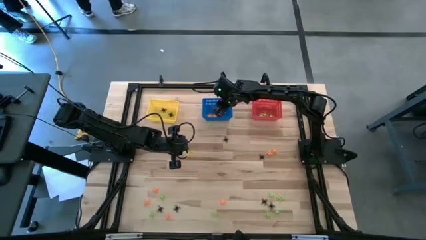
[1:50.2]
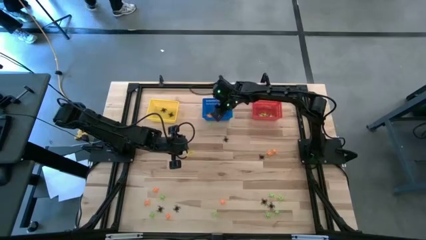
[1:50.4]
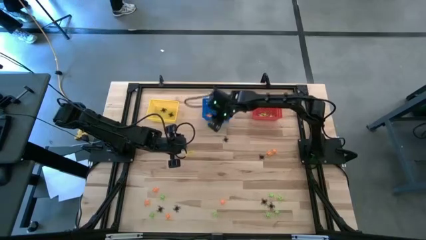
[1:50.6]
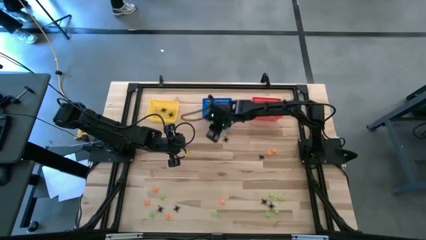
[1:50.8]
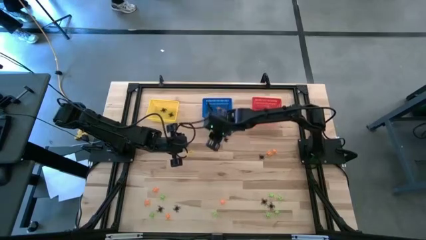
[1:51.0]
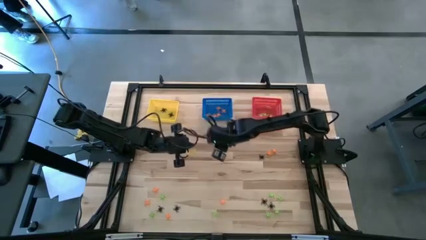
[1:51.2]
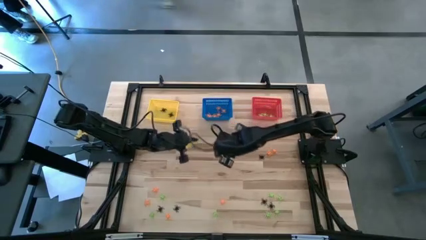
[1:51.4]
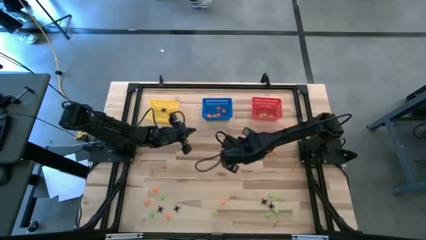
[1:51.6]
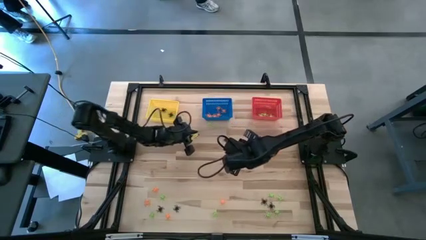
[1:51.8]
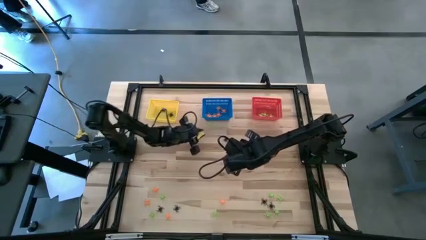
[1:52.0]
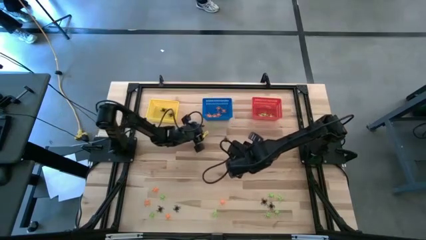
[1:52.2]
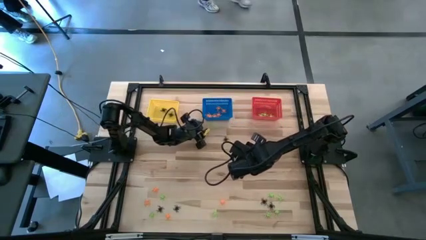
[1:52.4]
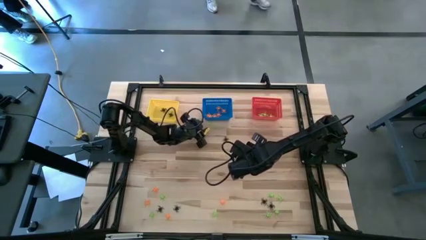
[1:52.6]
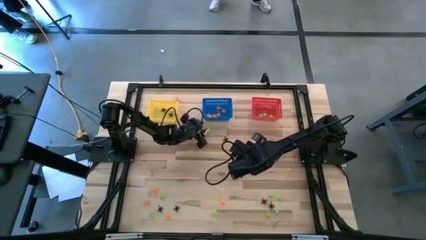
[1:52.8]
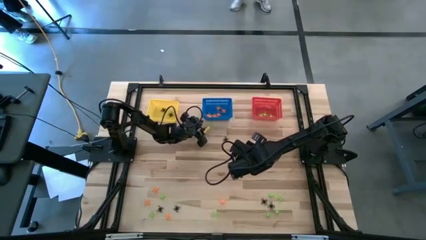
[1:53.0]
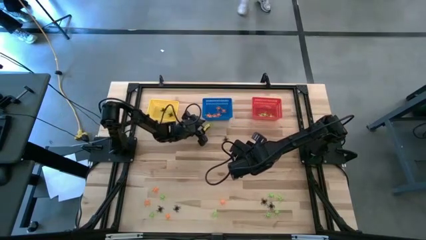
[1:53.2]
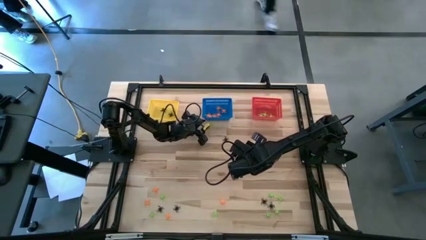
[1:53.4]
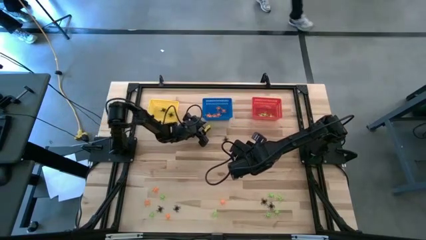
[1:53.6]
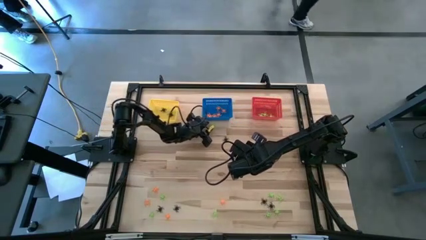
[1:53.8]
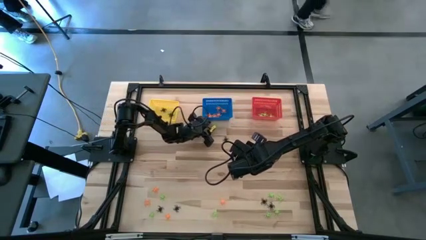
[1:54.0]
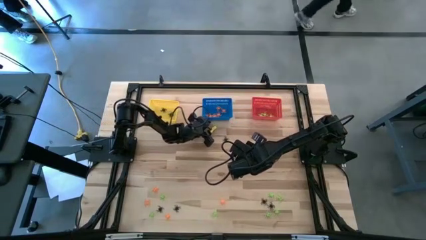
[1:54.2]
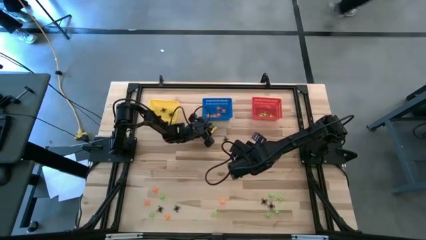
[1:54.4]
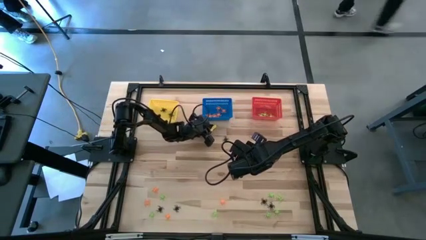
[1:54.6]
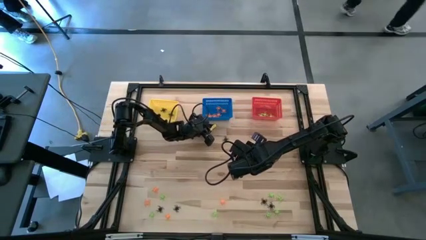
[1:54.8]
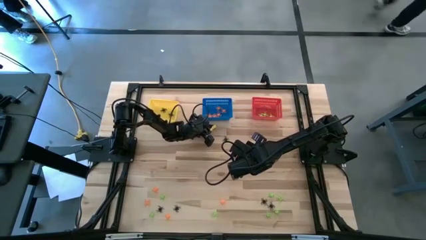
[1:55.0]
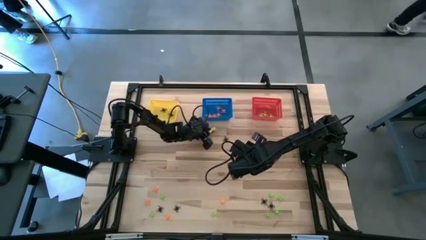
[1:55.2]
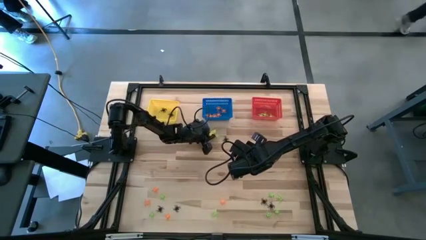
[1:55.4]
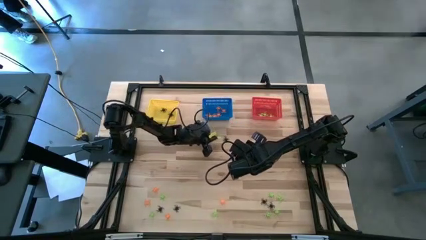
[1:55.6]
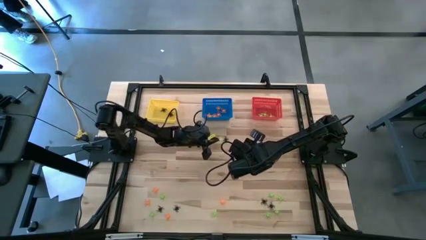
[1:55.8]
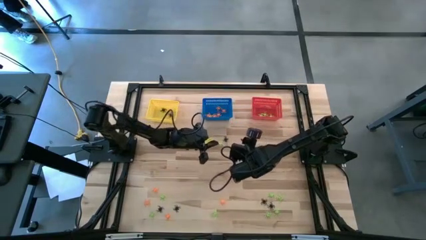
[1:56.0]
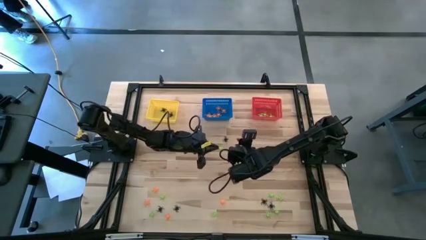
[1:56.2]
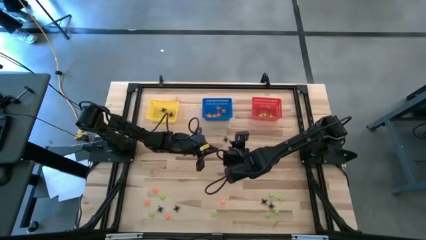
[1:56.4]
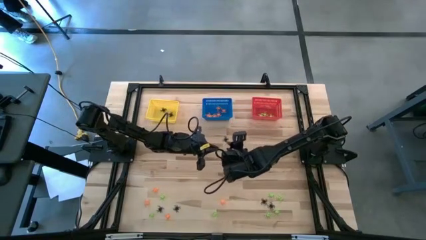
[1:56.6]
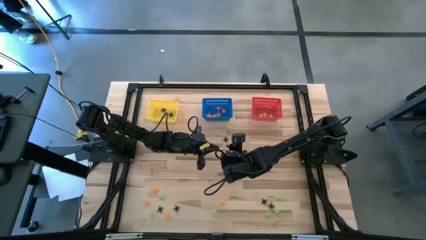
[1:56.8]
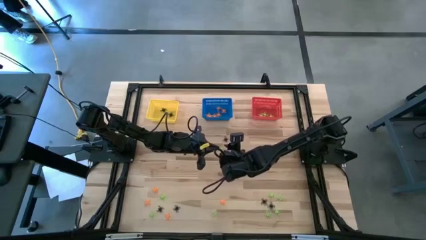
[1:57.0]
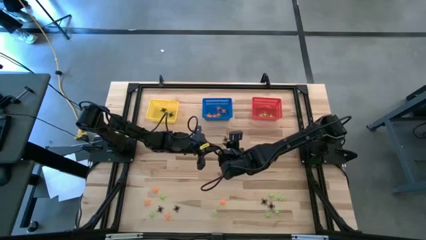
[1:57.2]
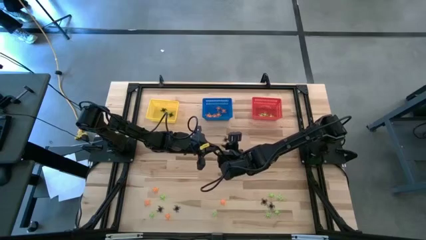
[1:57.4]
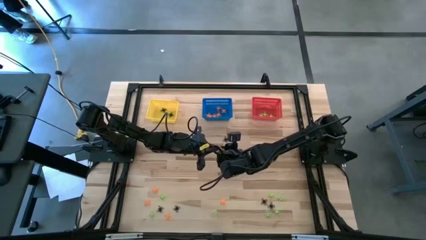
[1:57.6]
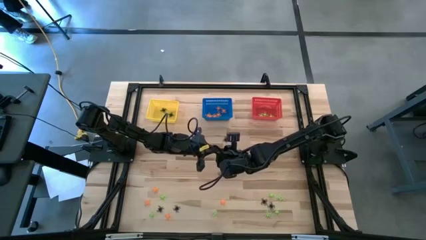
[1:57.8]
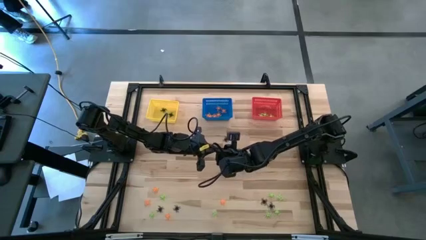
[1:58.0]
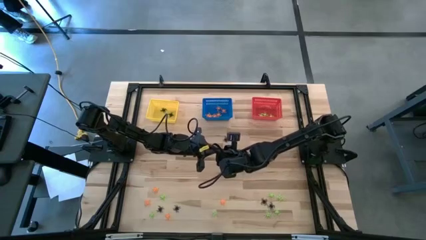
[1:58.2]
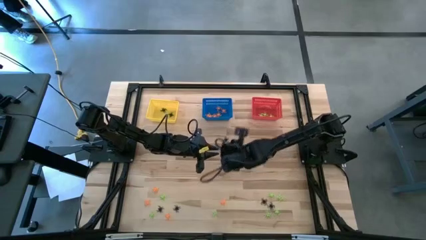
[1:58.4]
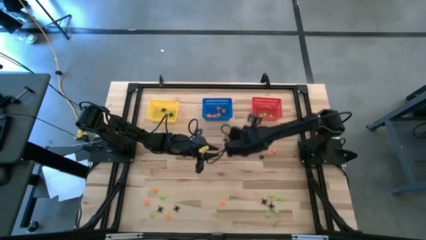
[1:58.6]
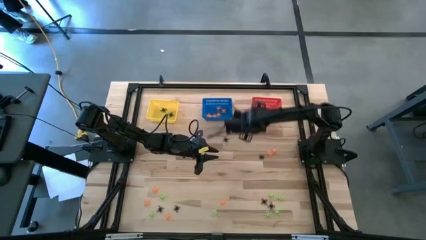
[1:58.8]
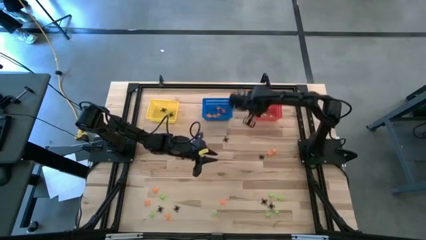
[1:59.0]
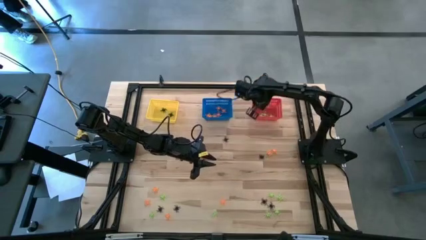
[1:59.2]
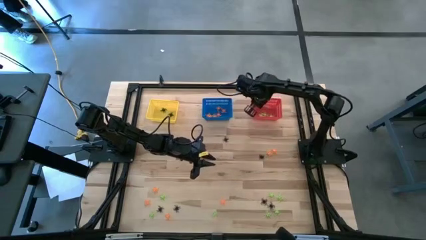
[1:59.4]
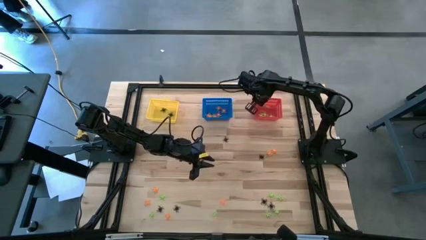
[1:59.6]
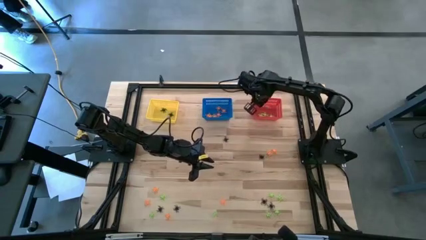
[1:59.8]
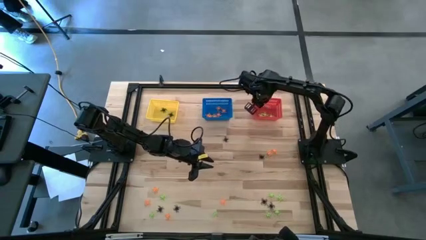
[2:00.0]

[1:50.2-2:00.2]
Task: Sort Halloween decoration
Put the green spider toy into the red basket

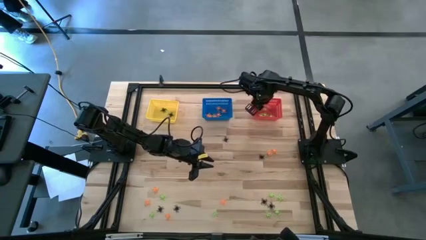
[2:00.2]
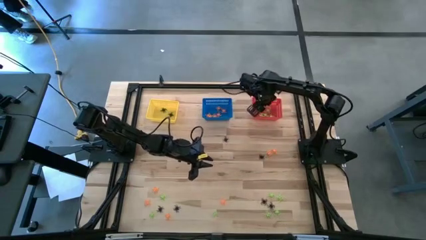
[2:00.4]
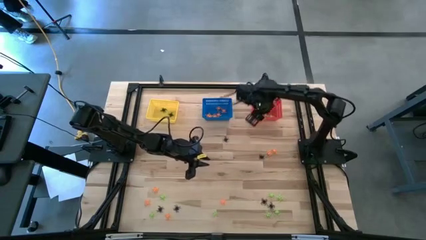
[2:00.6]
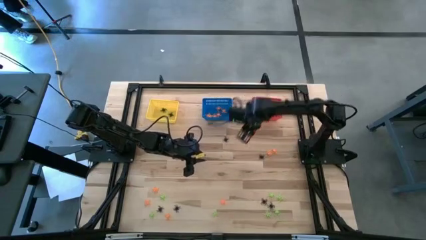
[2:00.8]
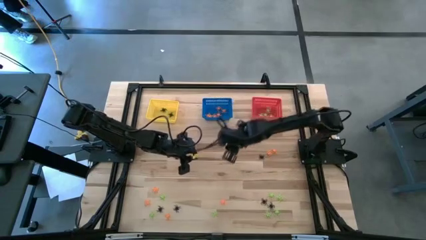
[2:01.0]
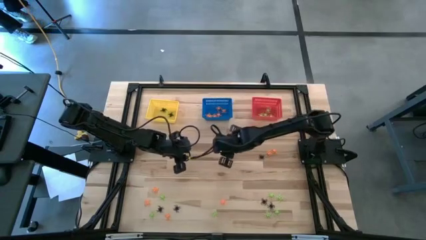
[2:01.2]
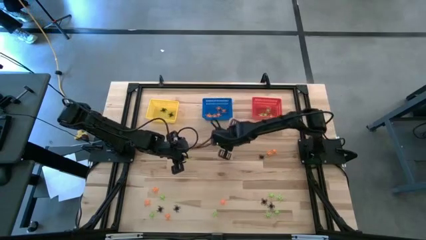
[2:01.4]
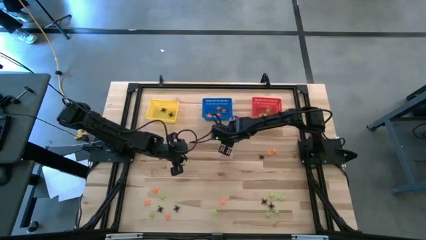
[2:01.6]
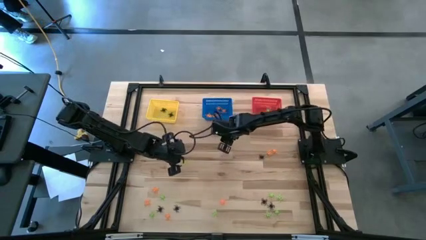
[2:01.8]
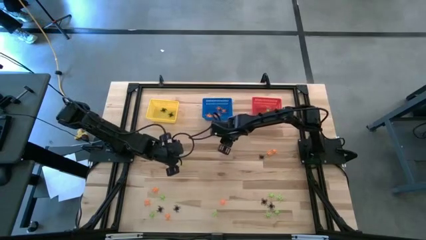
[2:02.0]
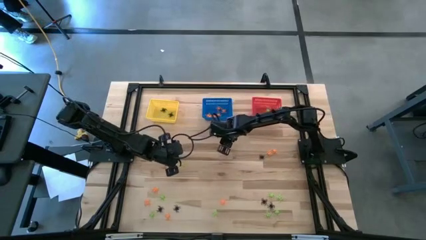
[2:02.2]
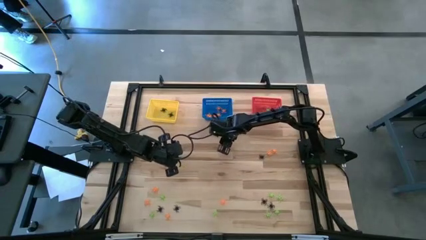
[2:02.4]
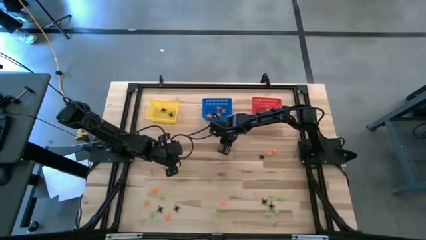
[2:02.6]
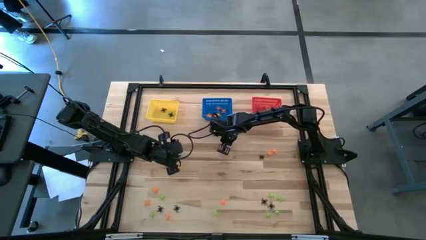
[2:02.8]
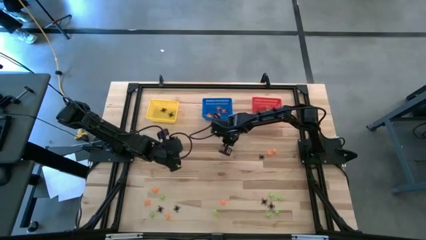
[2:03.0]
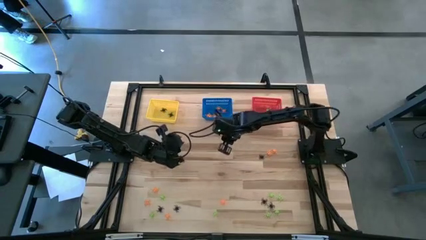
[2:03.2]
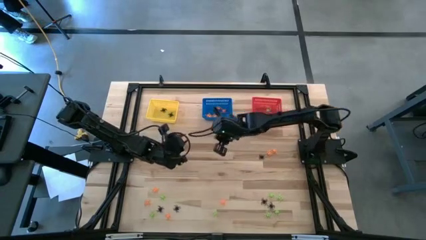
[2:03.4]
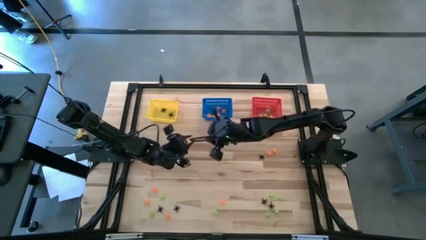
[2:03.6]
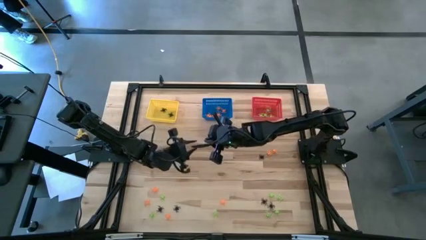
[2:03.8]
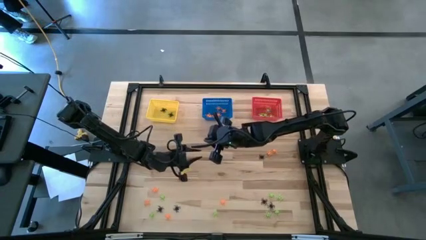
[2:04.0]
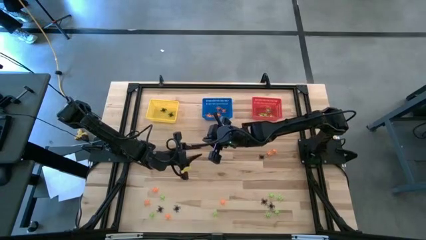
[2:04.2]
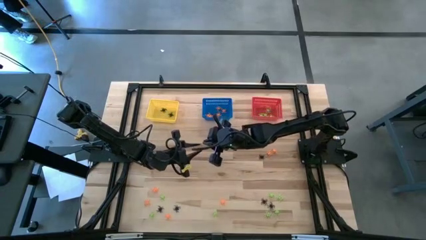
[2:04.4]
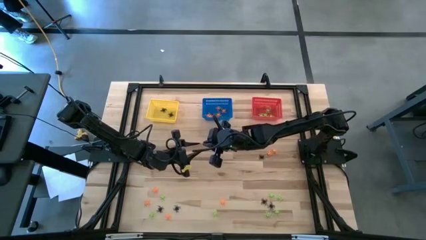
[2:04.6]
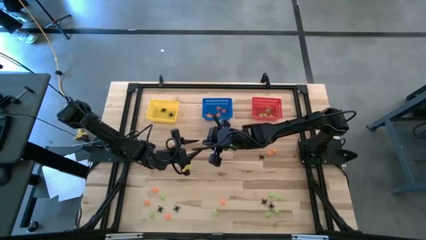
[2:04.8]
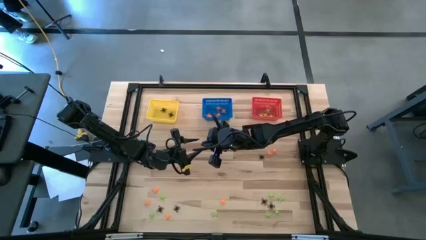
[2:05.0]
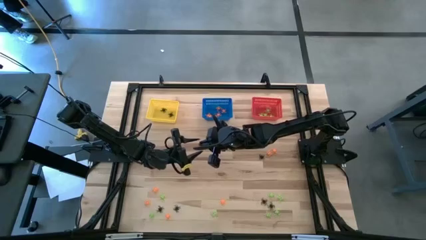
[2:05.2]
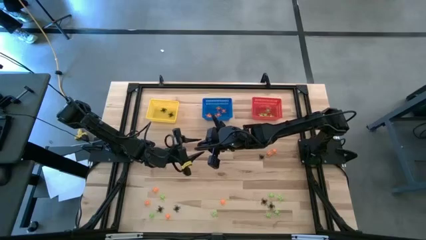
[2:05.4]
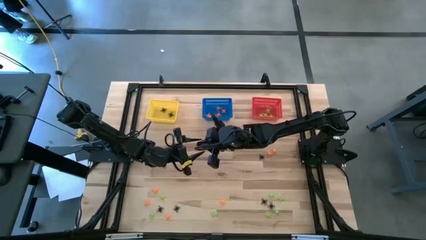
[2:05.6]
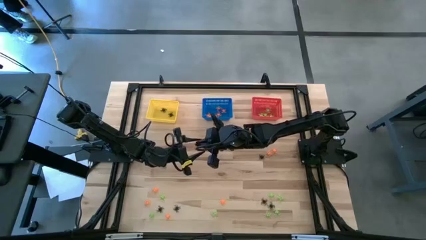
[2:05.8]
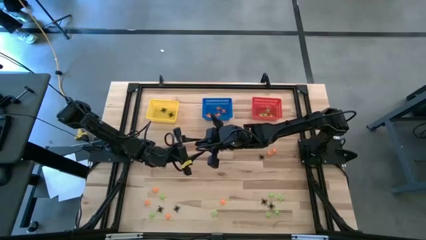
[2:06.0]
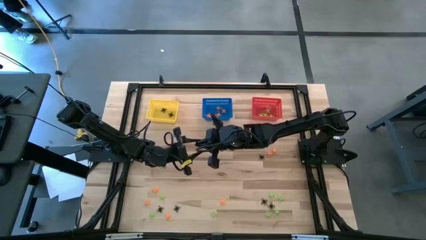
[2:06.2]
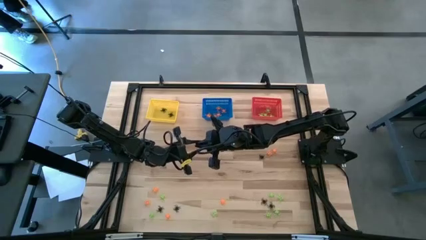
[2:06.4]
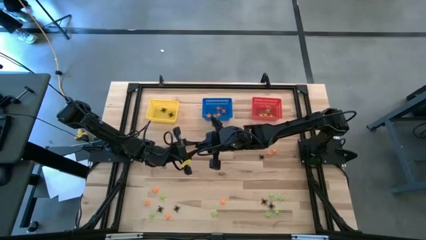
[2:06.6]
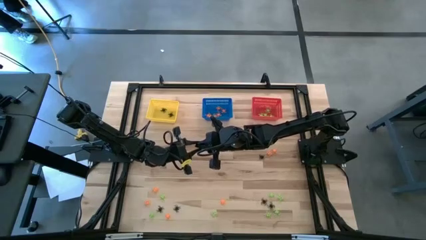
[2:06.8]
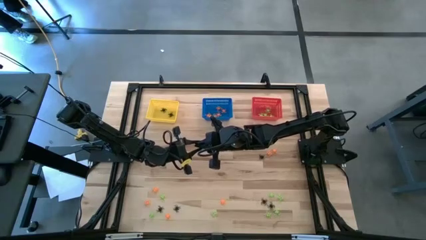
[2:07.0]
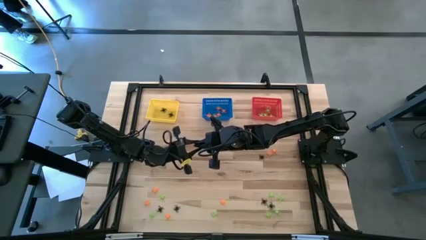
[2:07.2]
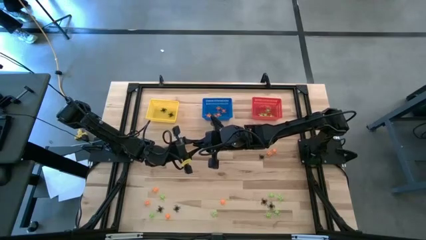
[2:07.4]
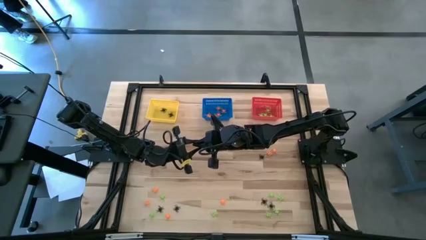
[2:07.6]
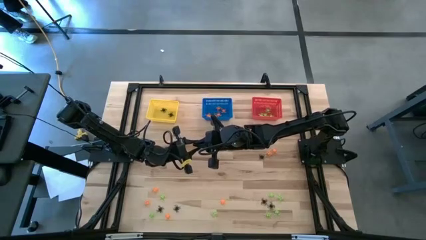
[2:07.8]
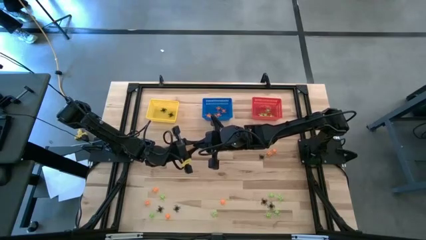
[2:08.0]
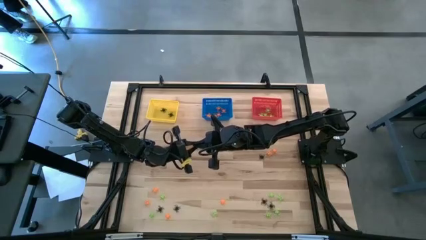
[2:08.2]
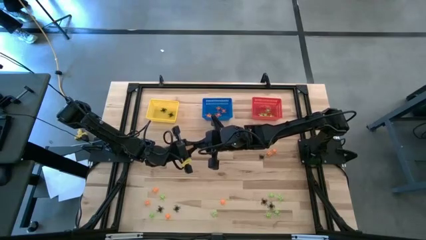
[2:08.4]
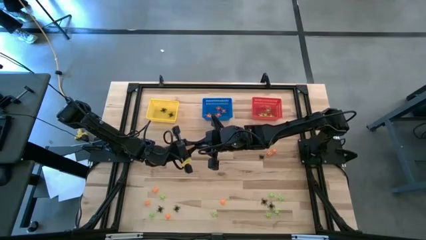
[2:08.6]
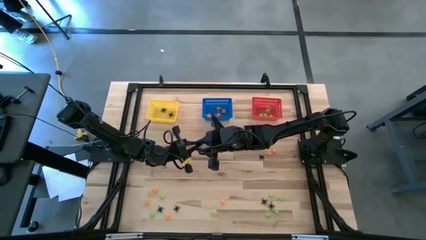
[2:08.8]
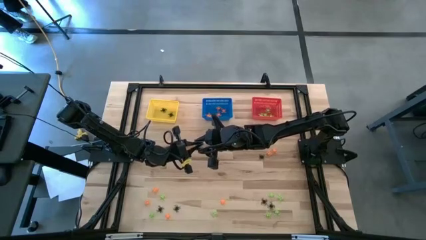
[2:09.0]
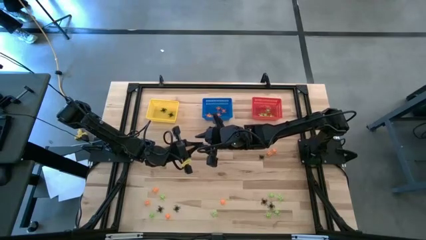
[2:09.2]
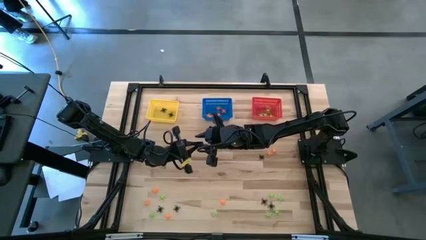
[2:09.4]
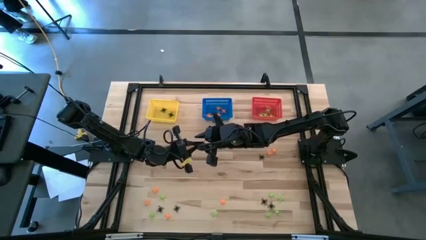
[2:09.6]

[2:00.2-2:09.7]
Put the black spider toy into the yellow basket
